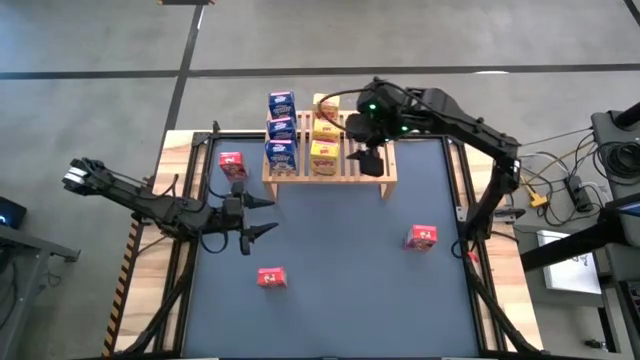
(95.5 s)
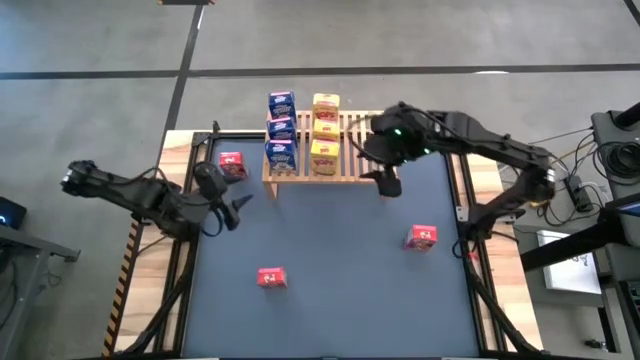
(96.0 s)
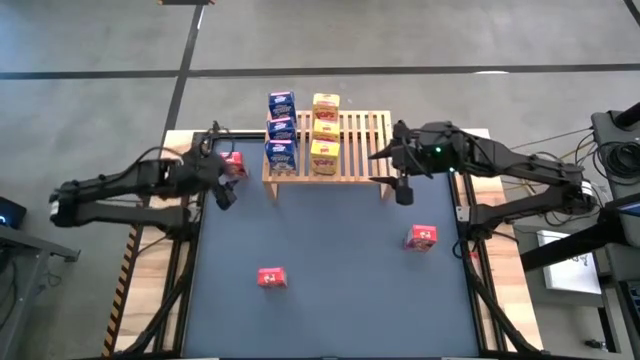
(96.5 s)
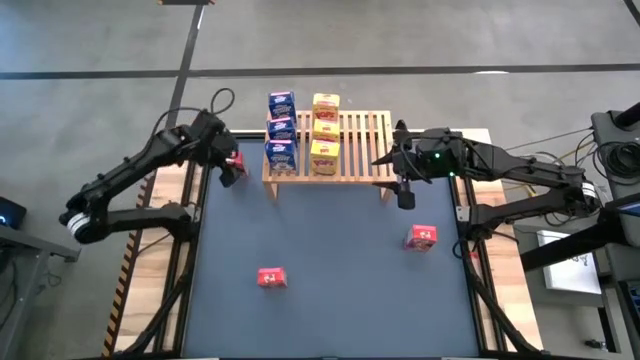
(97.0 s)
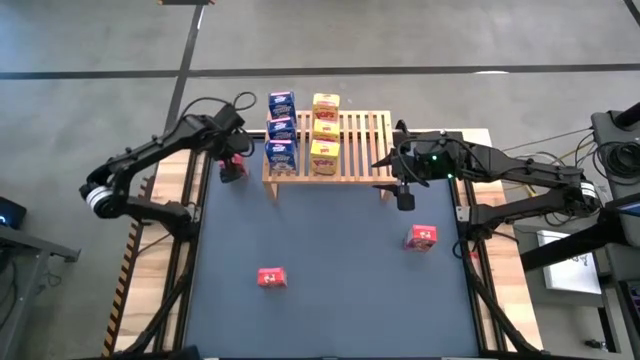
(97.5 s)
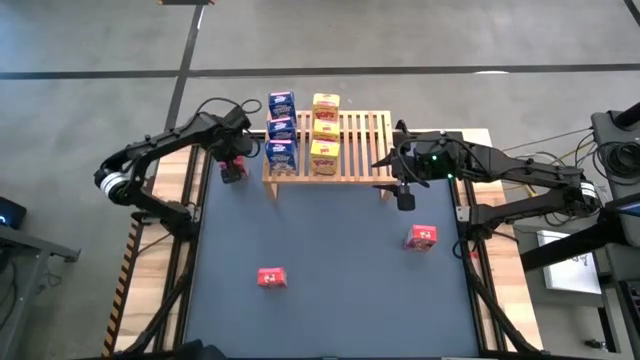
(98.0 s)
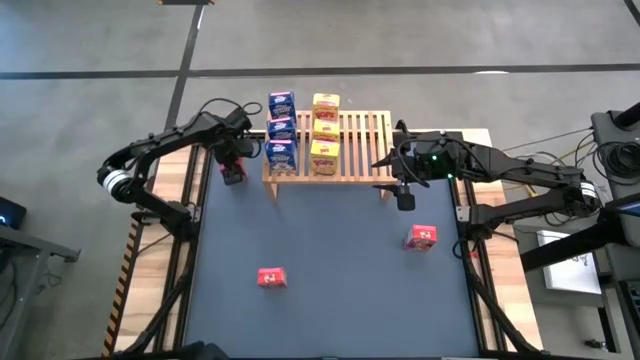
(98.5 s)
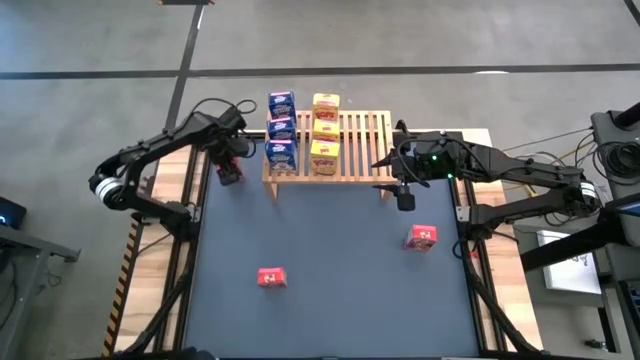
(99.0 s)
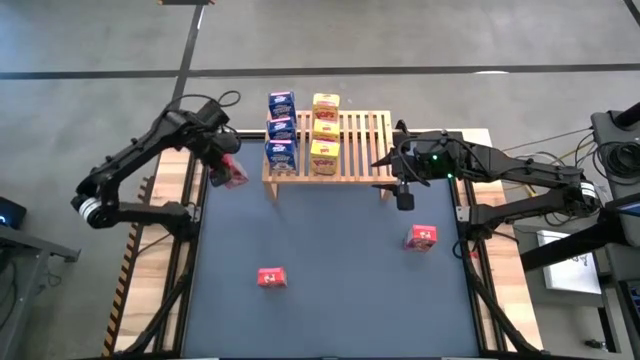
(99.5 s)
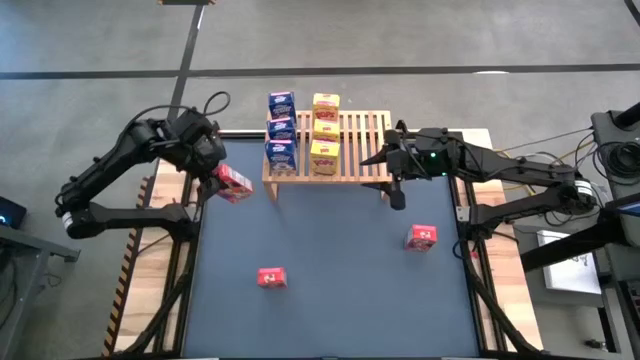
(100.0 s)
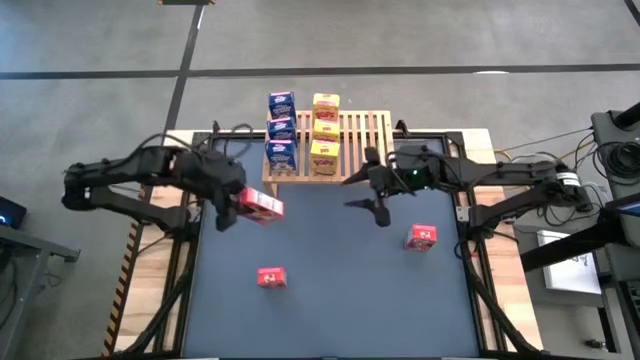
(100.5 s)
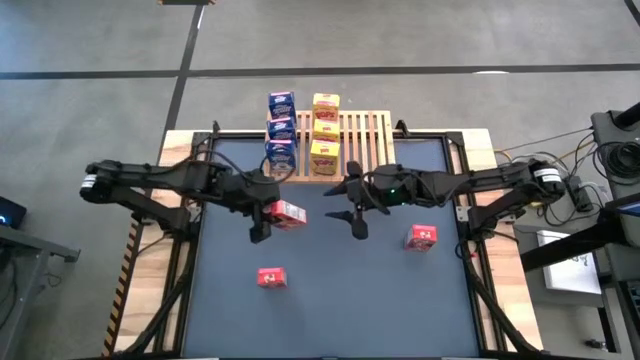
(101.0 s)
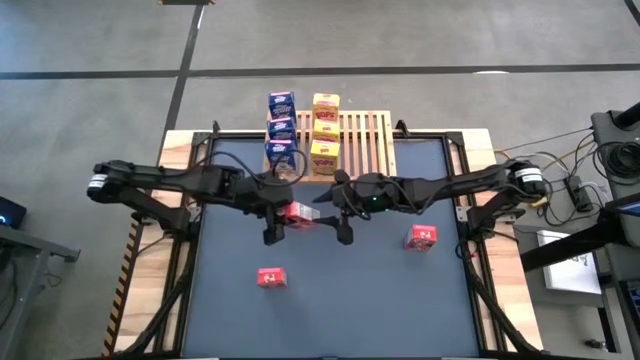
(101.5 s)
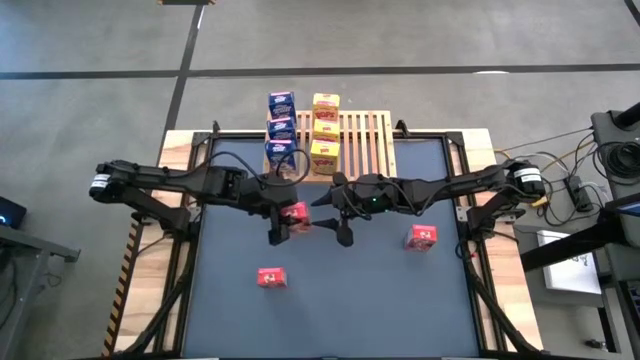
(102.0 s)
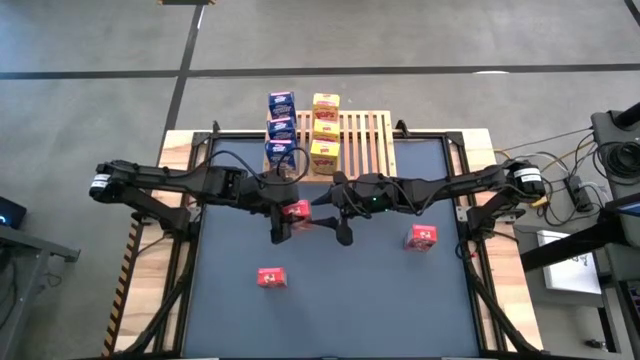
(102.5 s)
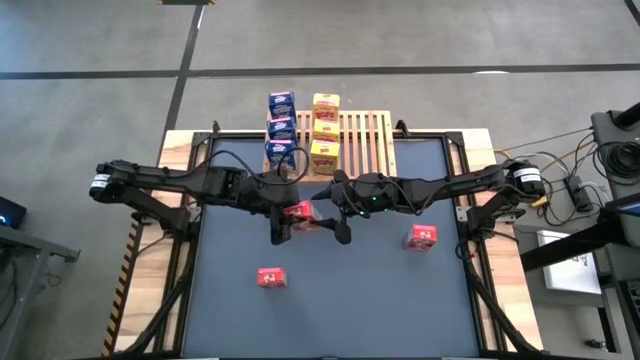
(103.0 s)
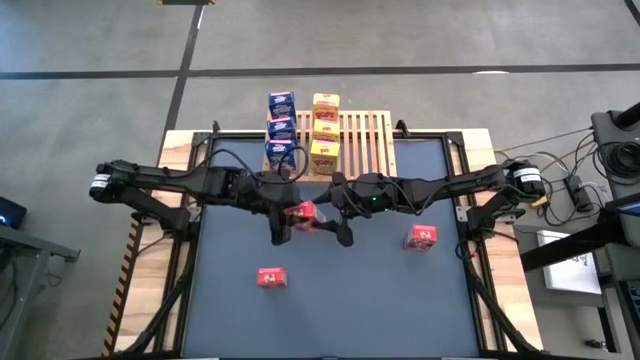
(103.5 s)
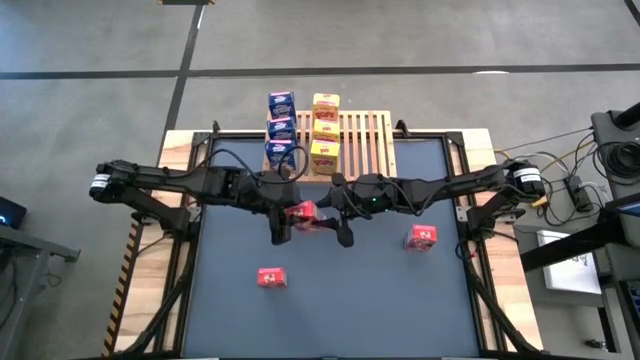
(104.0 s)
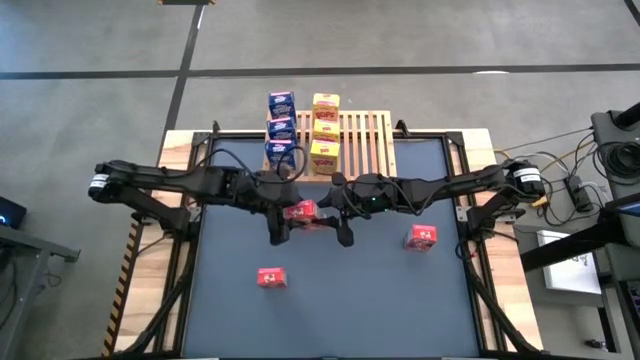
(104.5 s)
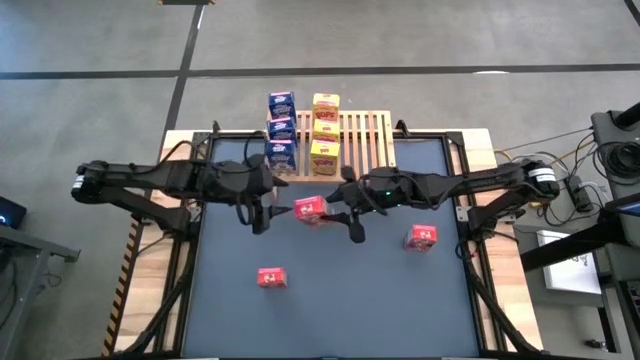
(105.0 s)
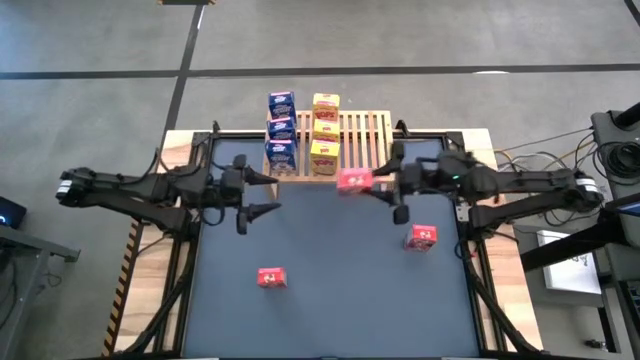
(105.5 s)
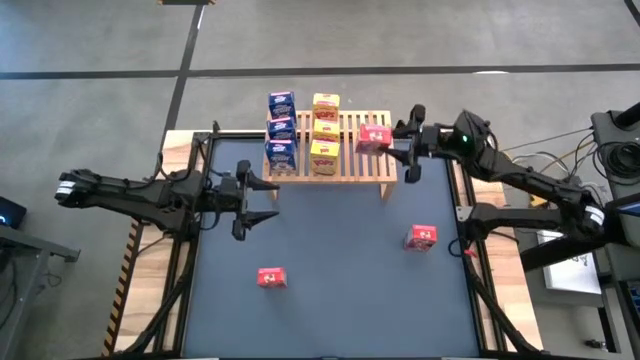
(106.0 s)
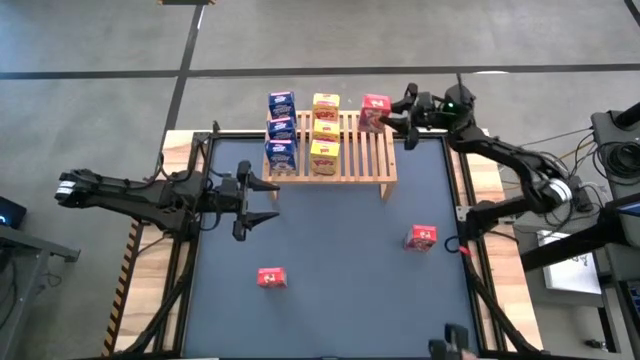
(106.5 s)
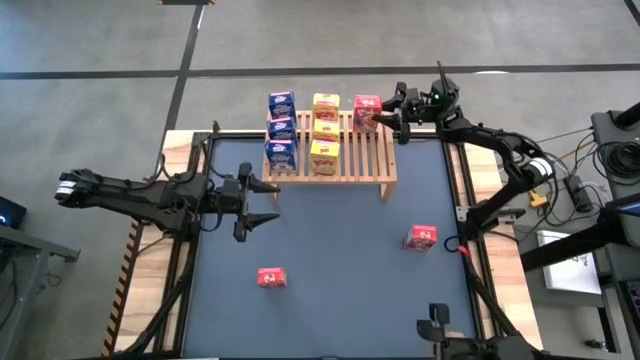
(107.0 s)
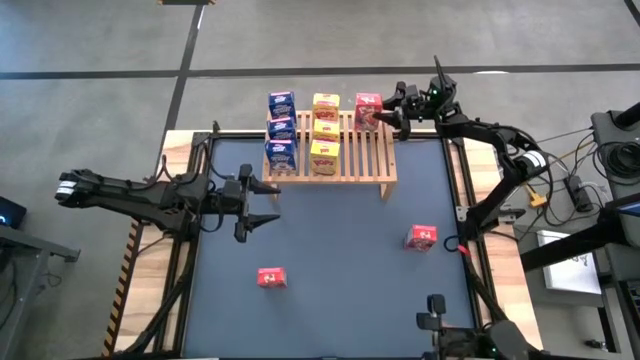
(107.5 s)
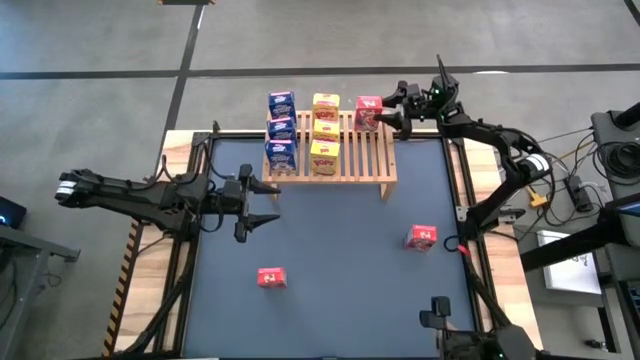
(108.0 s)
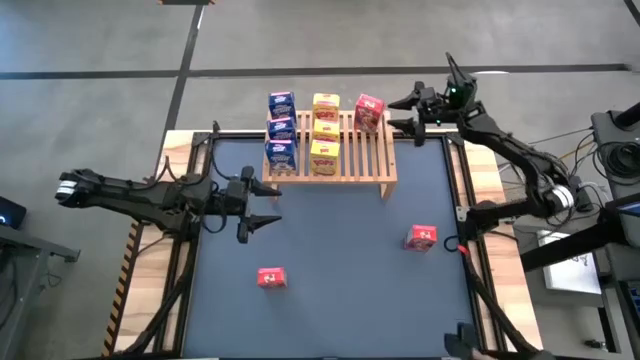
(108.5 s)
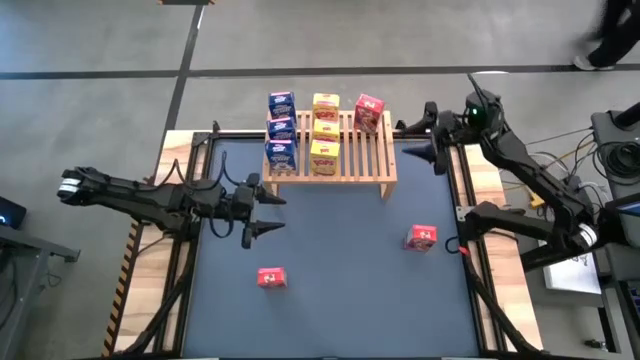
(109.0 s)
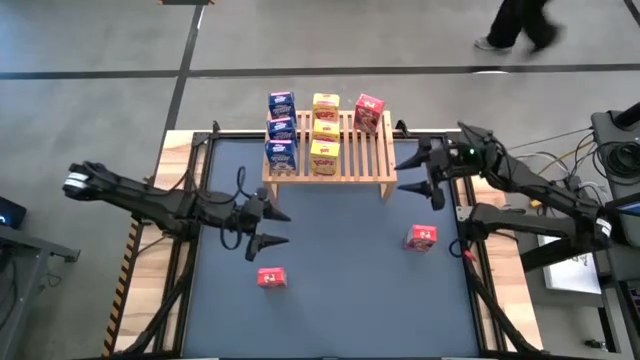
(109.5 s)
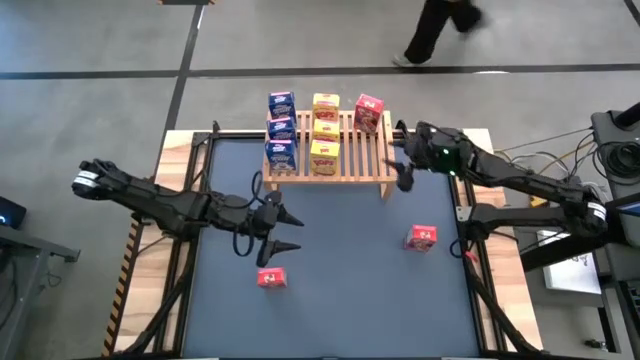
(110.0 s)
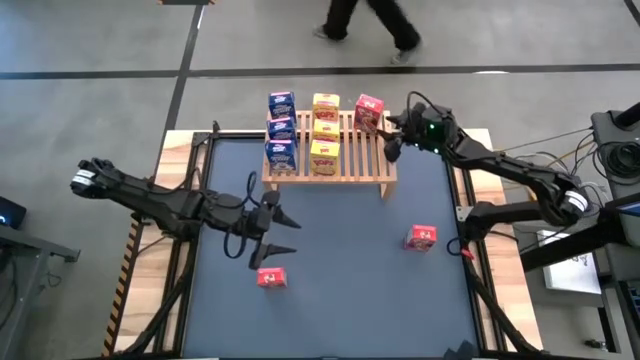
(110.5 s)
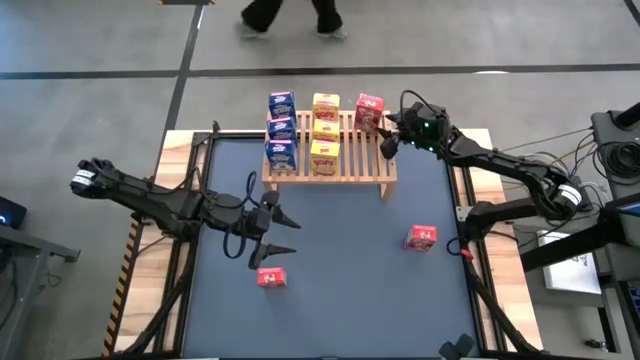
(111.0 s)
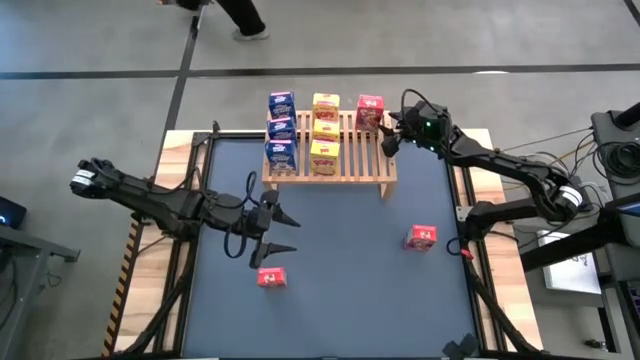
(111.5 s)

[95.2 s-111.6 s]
Task: Stack cereal on shelf
Put the top red cereal box on the shelf

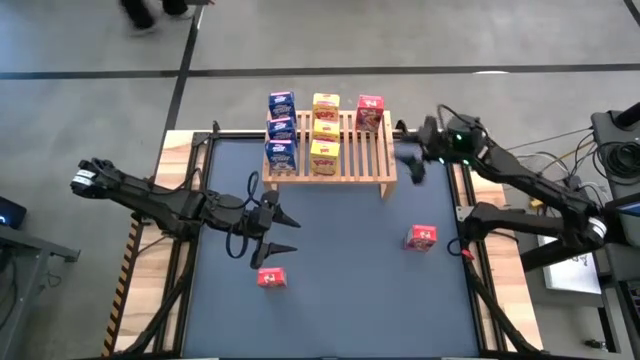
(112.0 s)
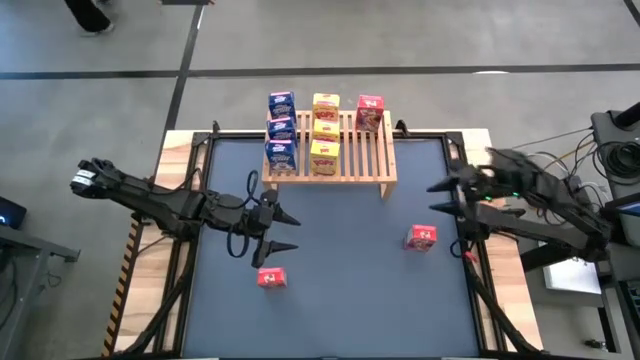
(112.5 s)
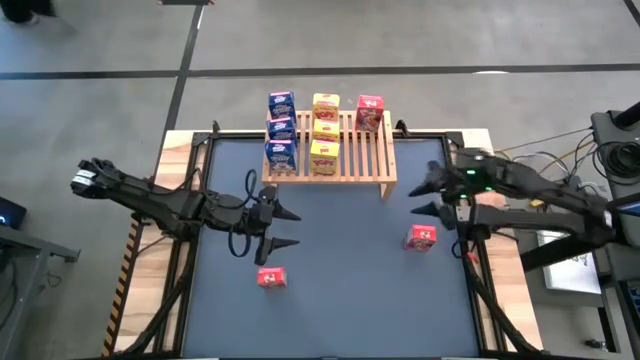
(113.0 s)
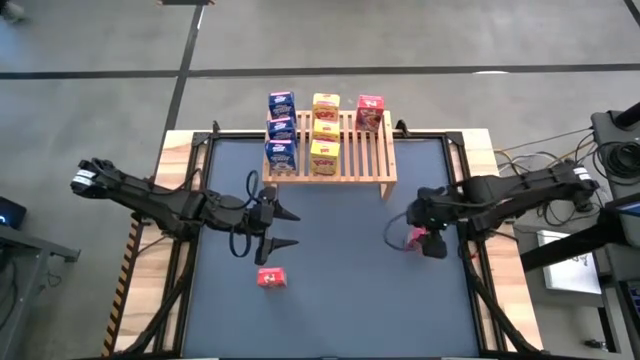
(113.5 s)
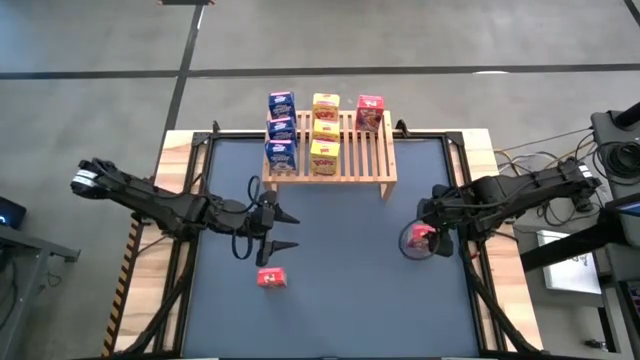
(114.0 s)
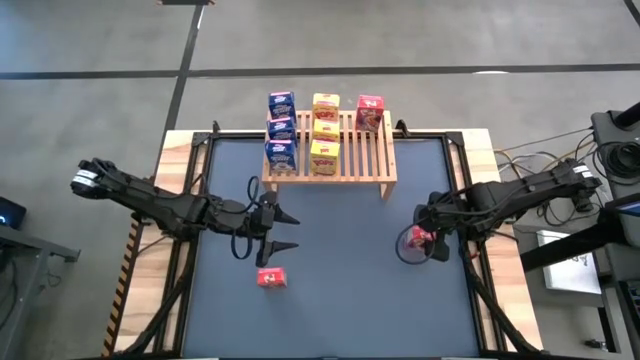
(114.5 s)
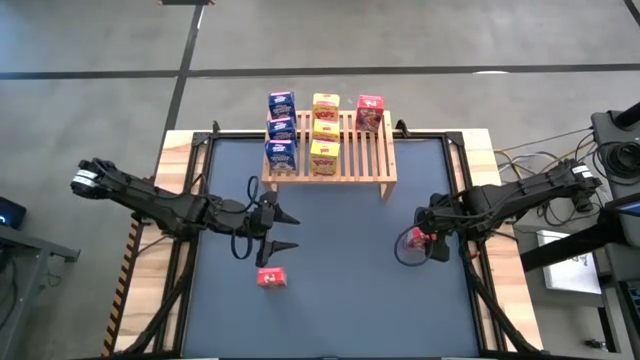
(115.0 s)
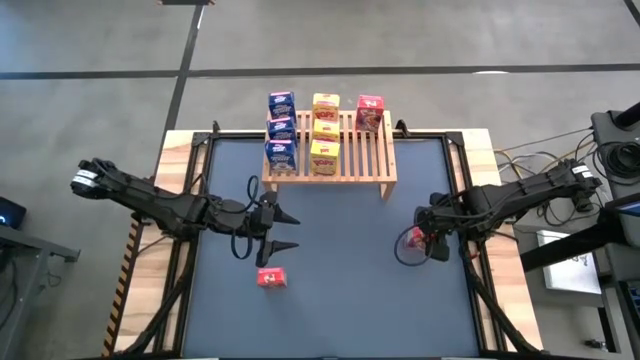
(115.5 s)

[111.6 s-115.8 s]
Put the top red cereal box on the shelf aligned with the other red cereal box

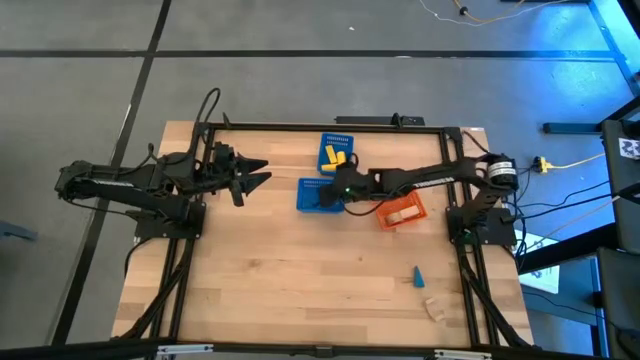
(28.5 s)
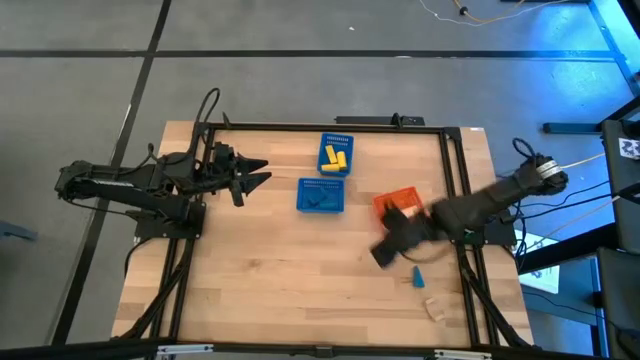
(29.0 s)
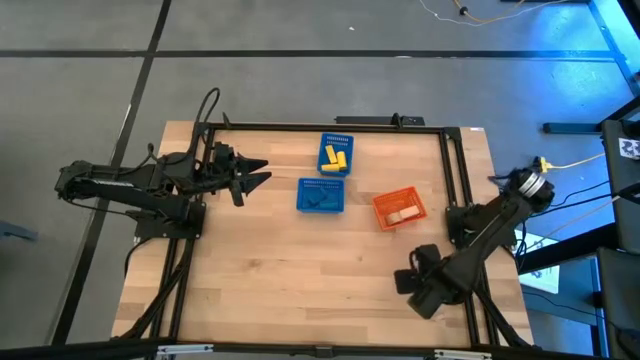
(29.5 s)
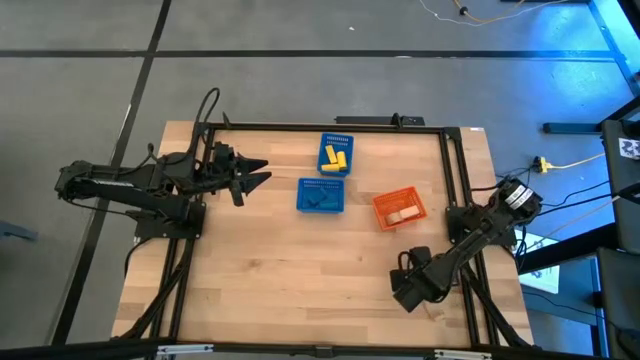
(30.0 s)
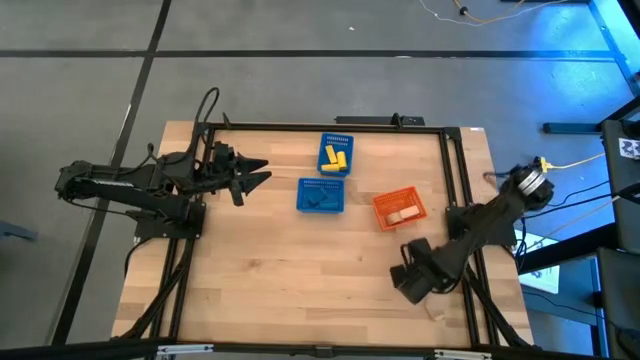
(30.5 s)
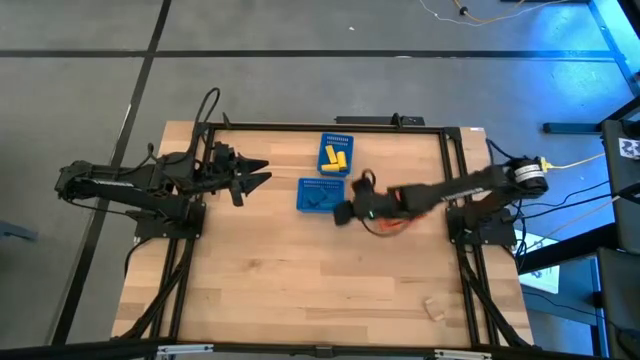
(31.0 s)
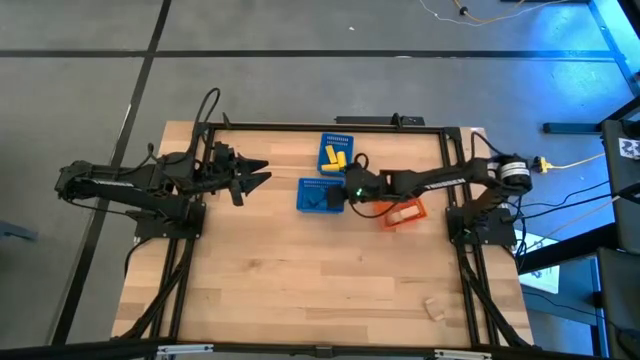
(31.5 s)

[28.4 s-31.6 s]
Task: Sort & place blocks by color
Put the blue block into the bottom blue basket
